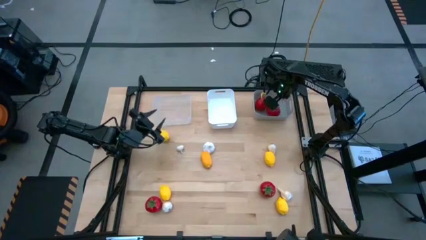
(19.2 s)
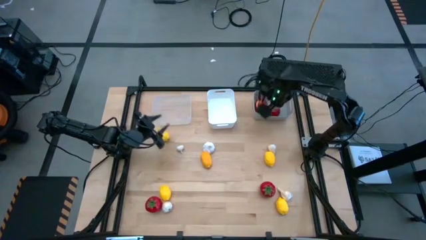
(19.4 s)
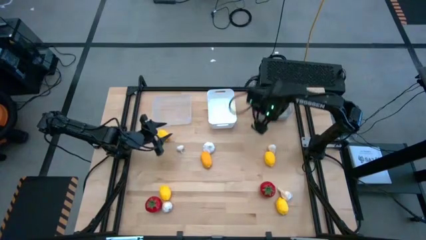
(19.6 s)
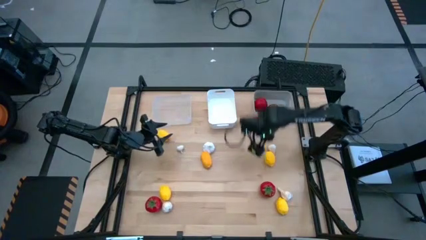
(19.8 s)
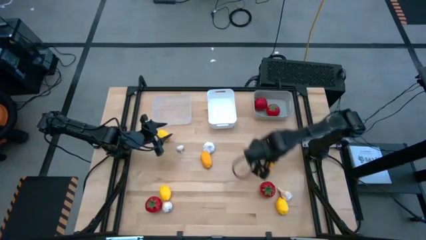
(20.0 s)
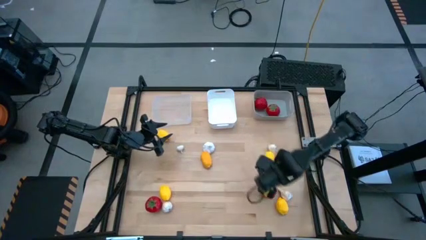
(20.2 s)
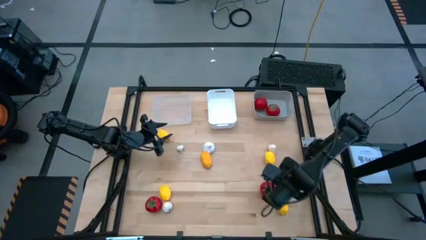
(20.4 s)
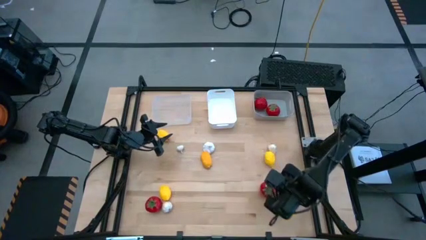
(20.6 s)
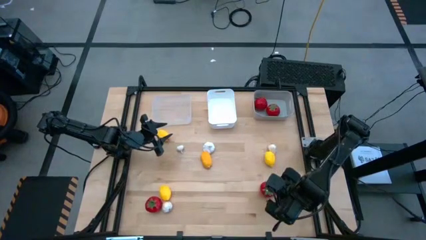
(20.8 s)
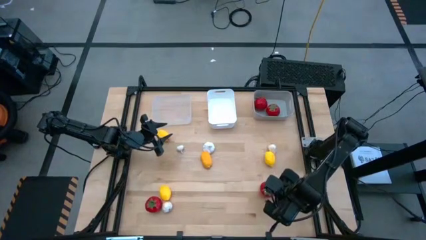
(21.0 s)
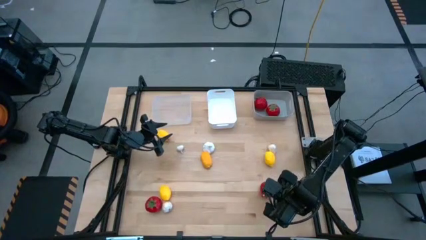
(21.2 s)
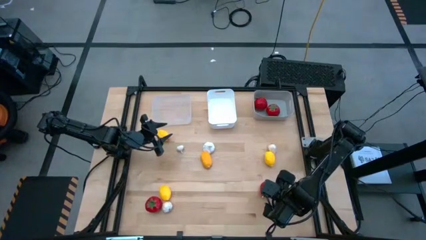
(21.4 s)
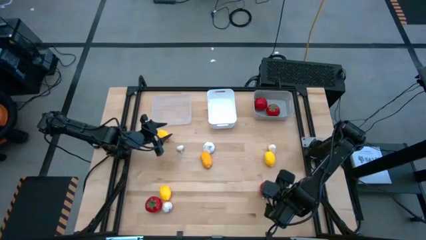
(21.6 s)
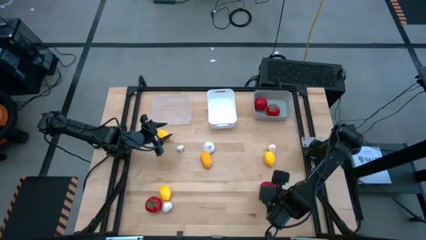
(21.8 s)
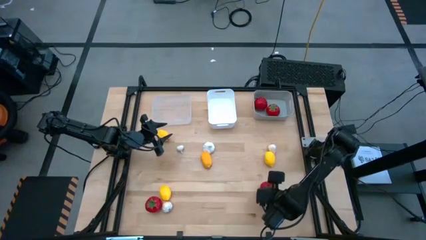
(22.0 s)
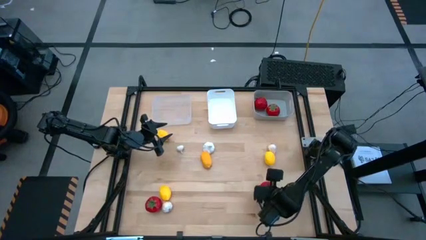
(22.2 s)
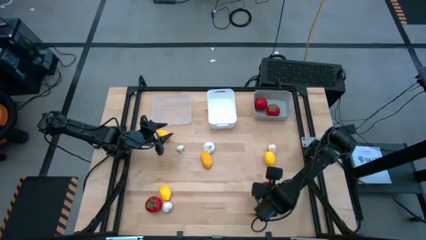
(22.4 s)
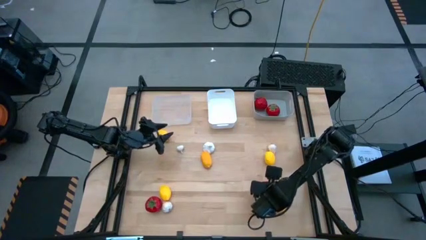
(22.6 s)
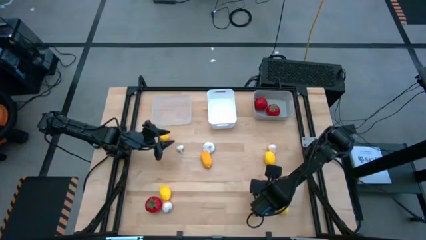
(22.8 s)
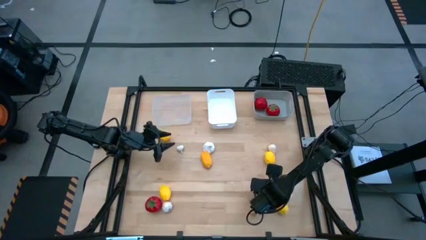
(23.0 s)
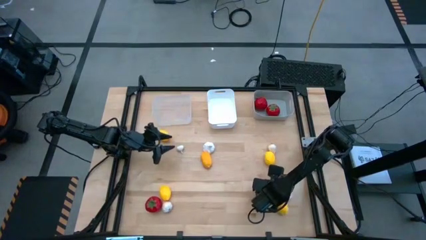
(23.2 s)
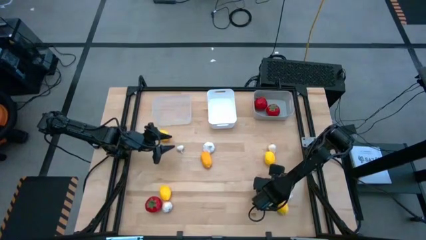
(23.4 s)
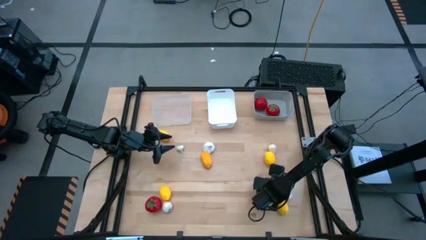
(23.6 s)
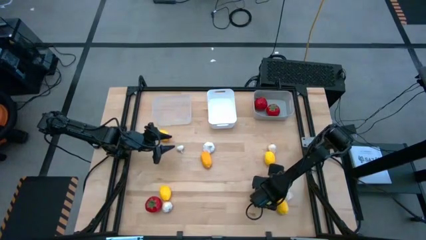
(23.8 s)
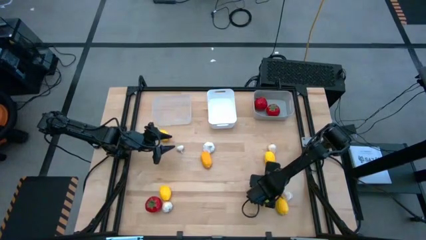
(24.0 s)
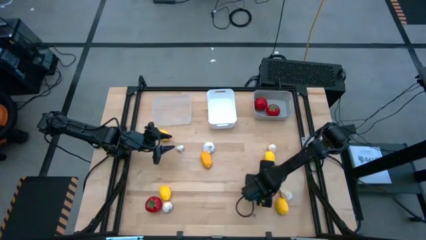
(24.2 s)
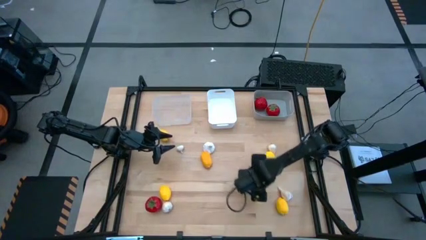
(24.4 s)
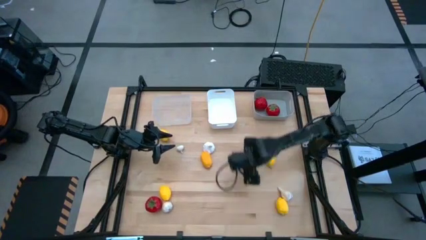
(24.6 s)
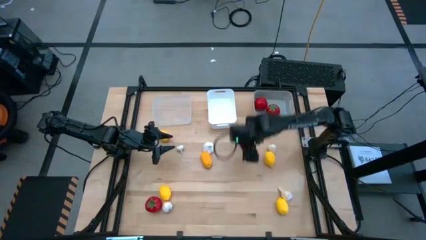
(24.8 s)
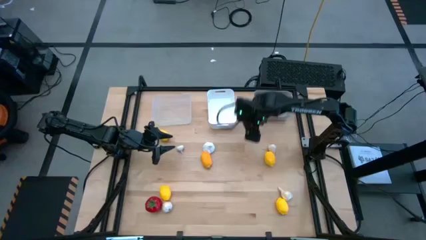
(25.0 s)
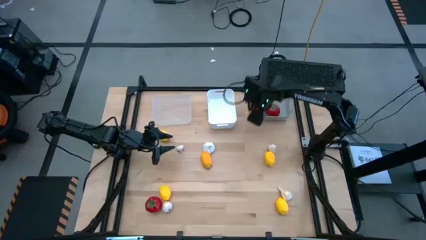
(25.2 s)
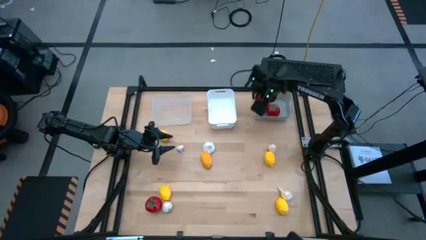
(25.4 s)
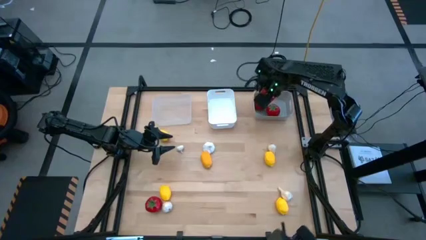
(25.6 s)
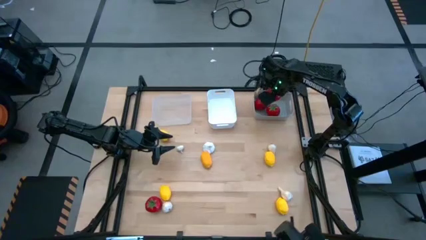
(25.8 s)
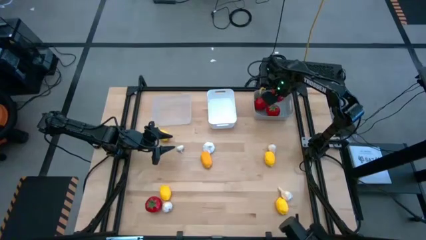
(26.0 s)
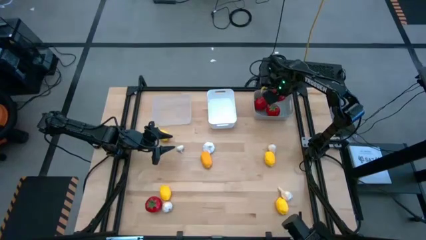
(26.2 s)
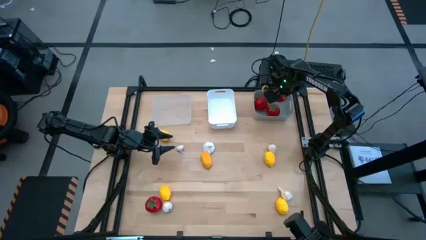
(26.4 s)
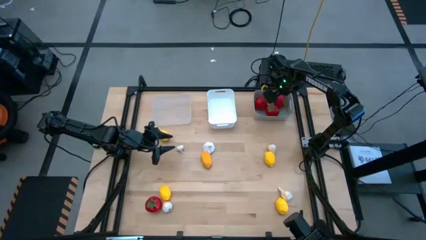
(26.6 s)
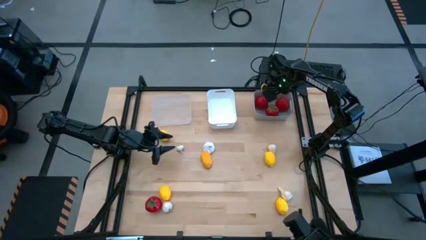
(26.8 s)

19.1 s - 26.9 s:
Task: Sort produce into baskets
Put the tomato into the gray bin

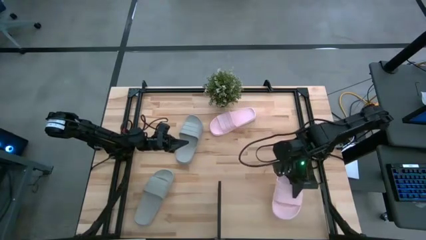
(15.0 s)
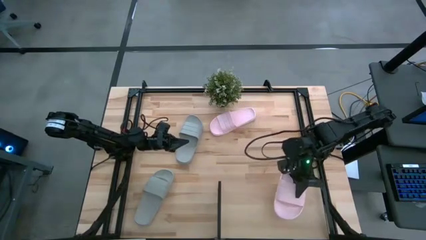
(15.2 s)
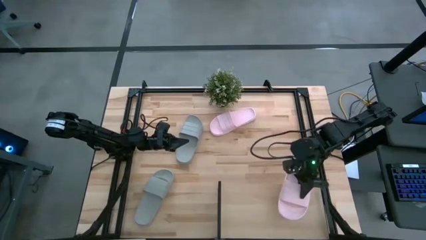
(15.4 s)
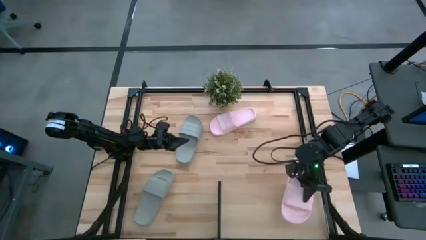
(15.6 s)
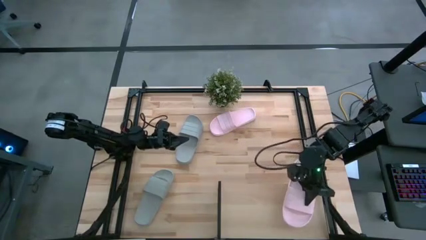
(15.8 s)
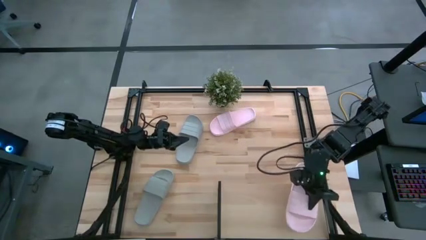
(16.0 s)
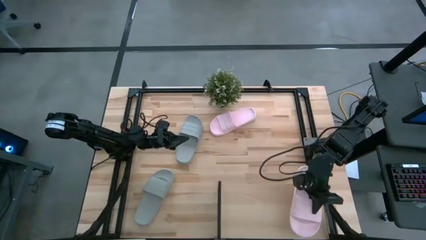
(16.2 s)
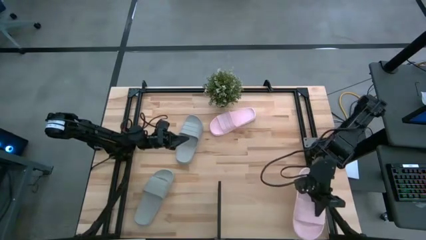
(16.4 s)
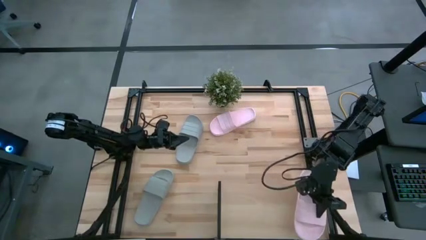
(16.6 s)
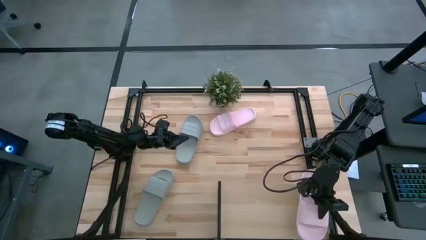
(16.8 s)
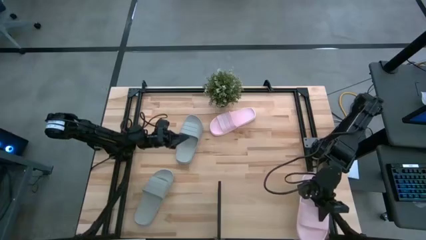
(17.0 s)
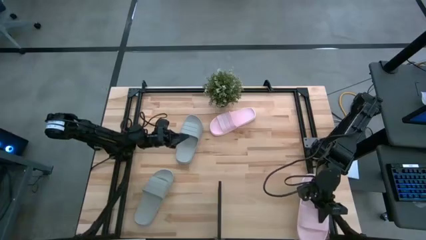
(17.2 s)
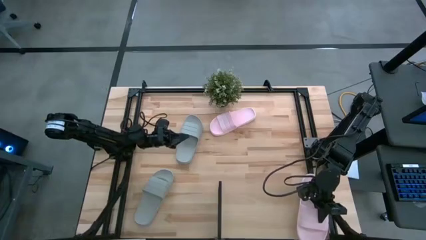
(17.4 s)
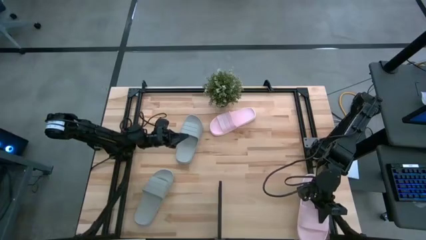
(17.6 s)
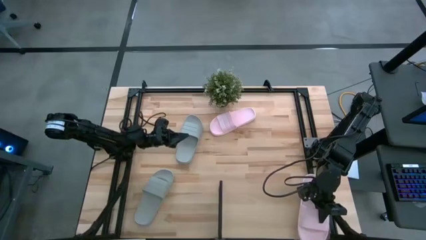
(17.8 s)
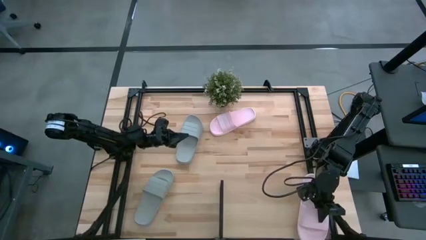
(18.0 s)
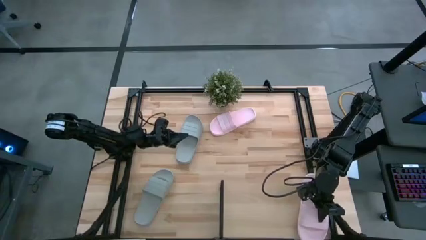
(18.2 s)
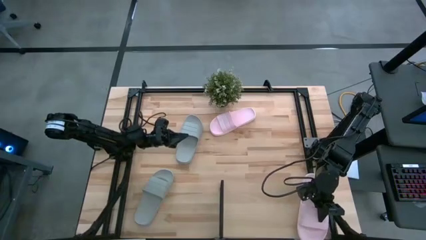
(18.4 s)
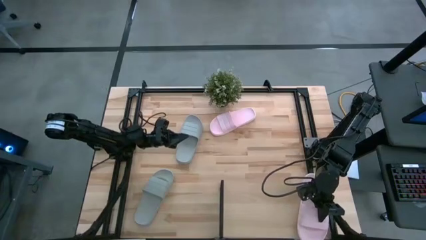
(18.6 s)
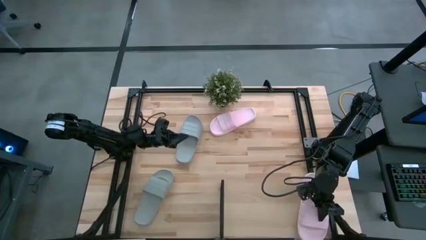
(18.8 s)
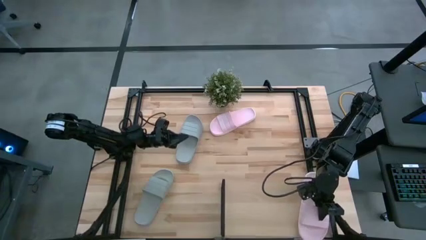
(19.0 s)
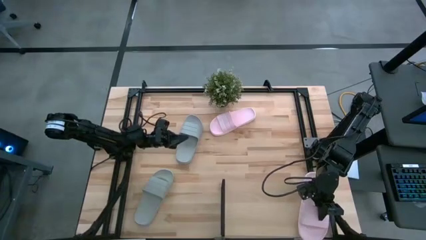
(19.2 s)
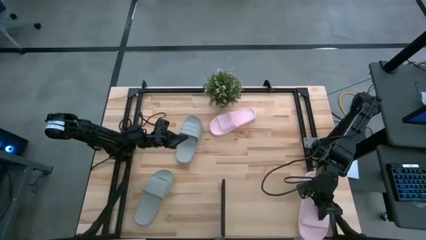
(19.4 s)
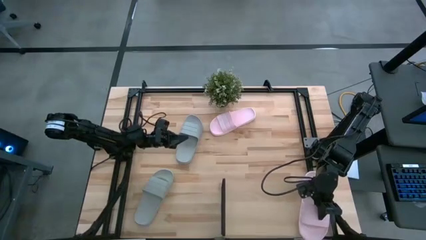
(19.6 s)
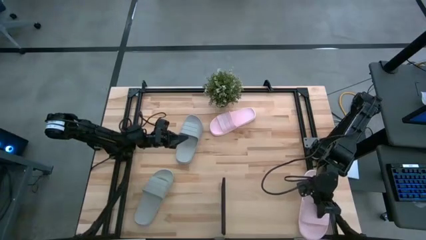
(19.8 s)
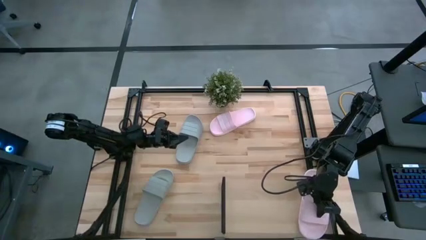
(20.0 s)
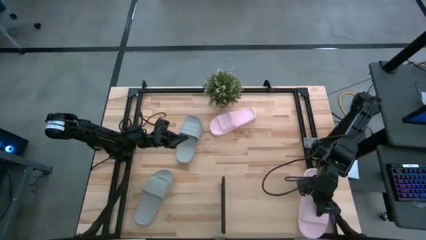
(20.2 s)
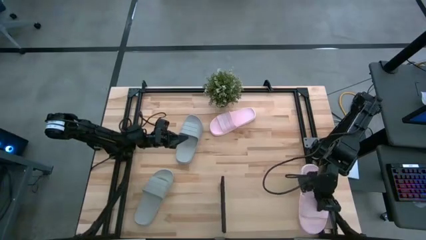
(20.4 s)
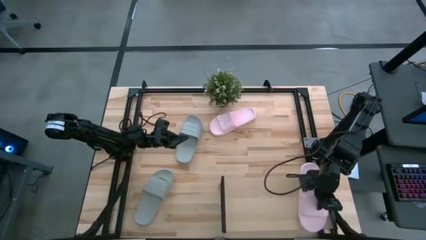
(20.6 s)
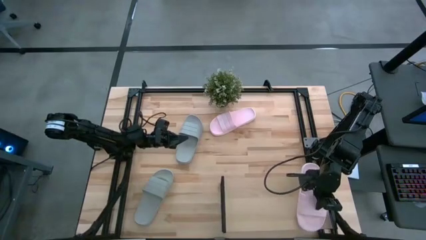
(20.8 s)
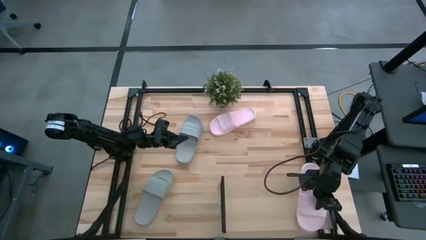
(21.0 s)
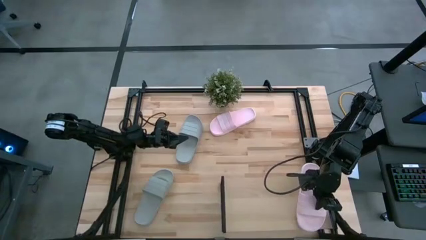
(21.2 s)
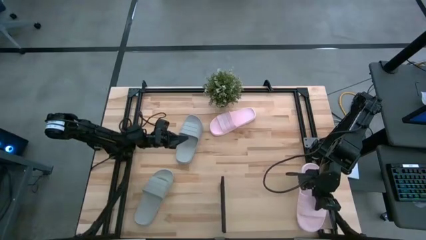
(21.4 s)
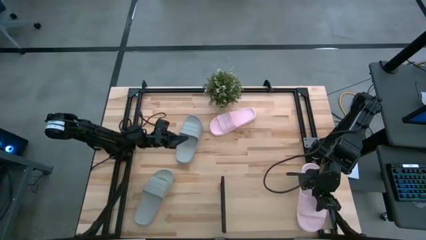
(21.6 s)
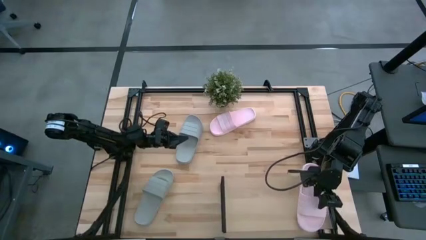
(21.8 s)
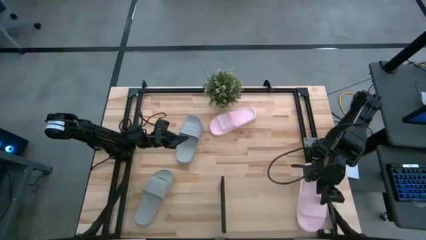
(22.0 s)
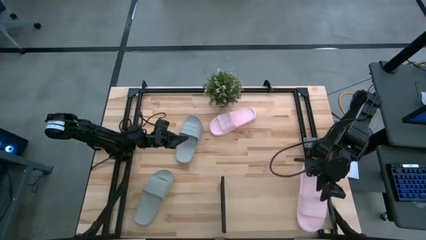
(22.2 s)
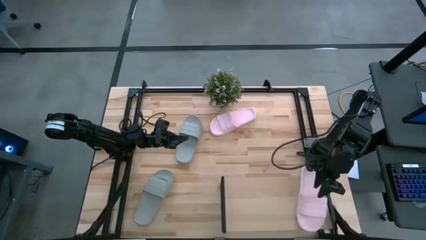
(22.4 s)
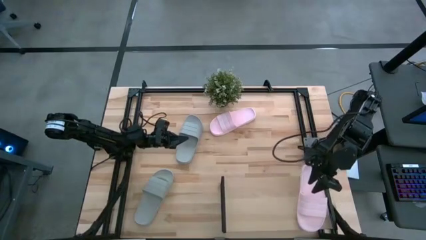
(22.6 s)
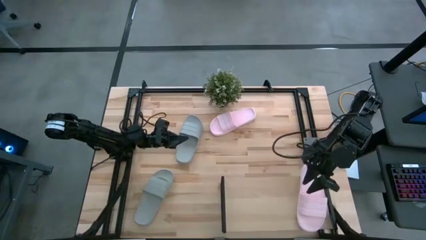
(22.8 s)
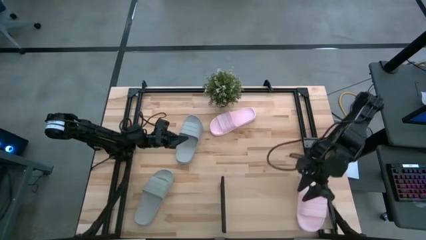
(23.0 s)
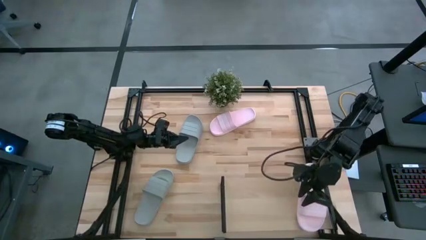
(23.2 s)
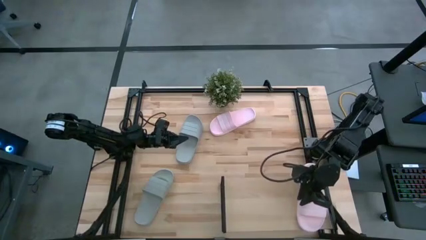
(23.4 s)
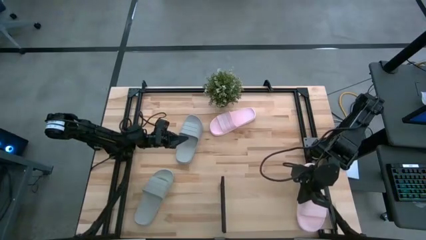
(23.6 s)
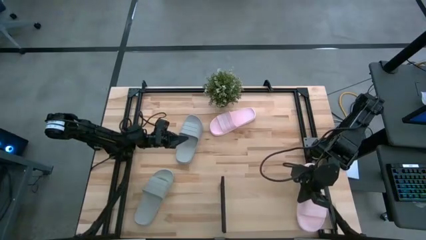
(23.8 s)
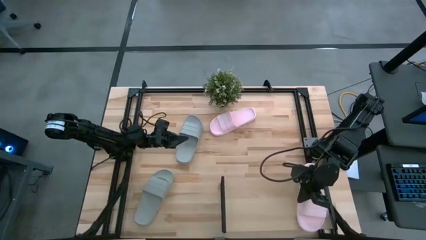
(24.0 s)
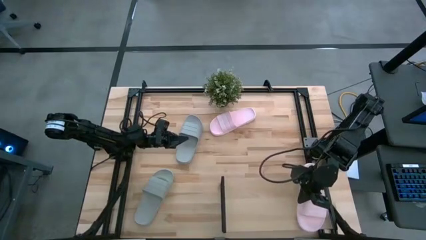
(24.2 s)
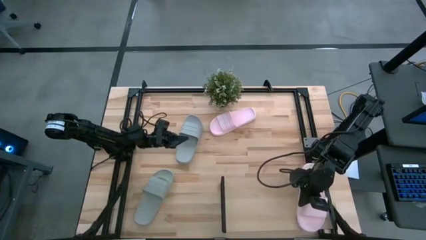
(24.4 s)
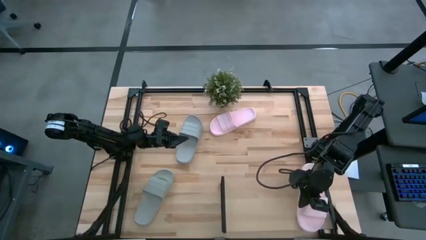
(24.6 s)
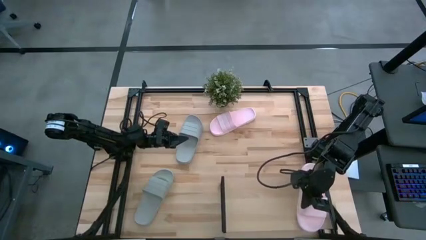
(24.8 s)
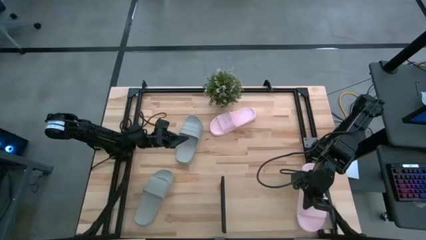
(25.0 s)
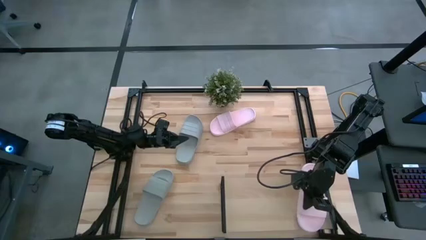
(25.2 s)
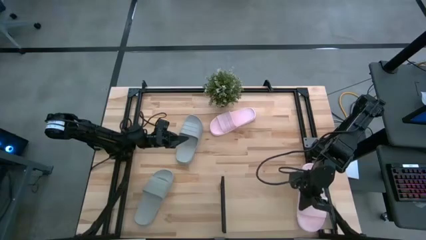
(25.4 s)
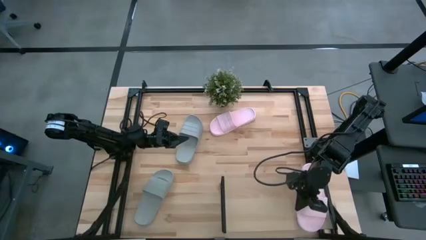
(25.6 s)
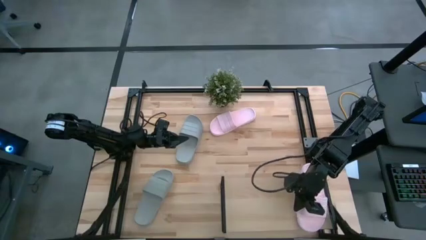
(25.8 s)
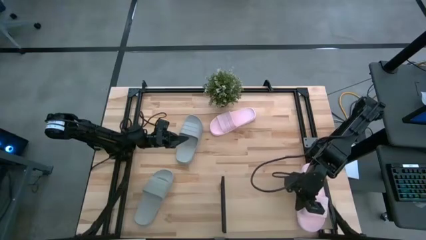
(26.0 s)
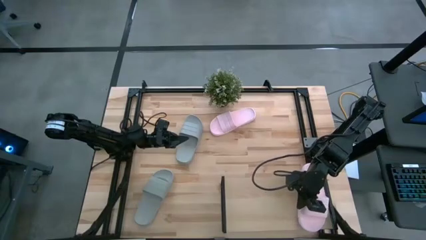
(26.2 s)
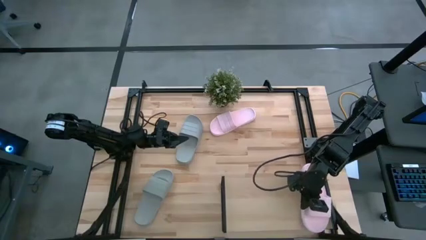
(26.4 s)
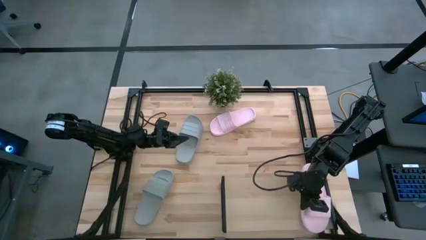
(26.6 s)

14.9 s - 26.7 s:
Task: Pick and place slides into the shelf
Put the bottom pink slide on the shelf
